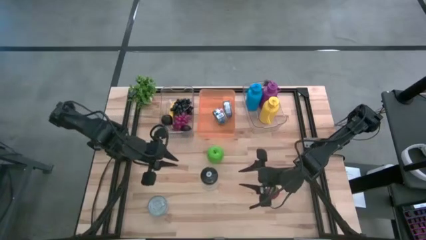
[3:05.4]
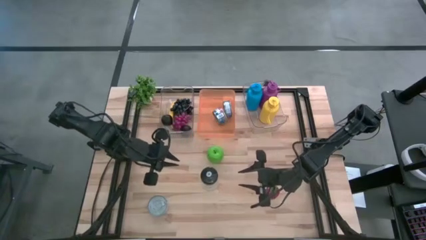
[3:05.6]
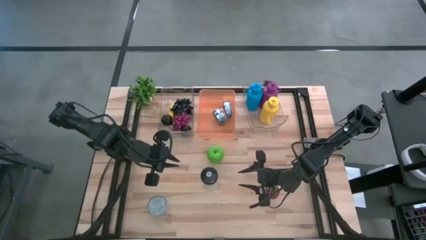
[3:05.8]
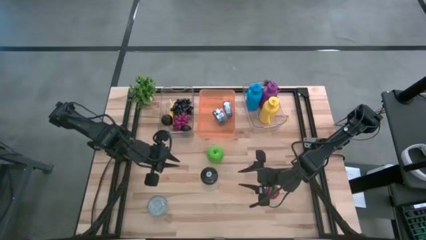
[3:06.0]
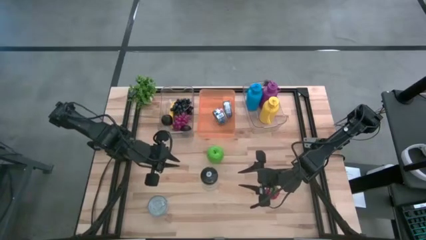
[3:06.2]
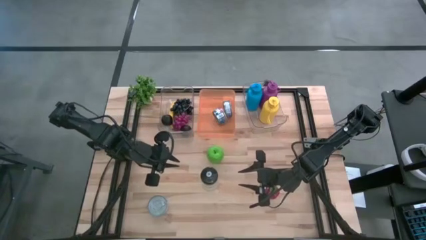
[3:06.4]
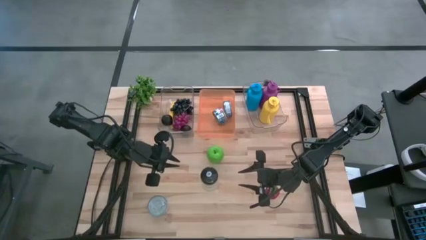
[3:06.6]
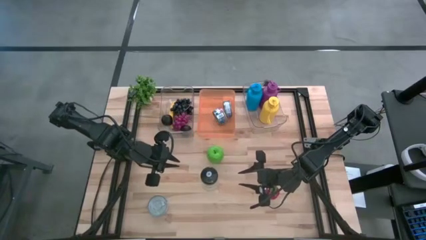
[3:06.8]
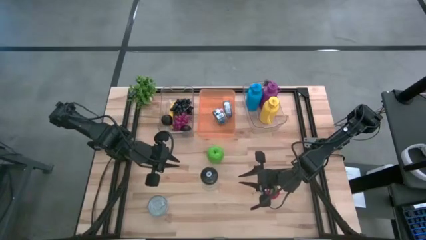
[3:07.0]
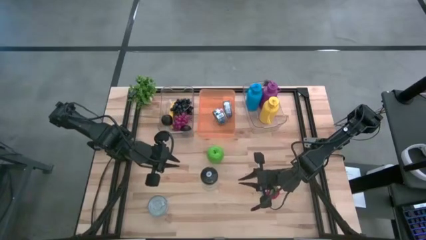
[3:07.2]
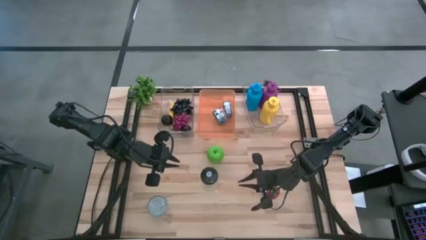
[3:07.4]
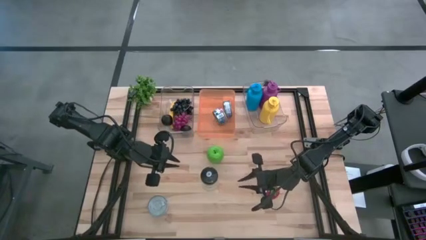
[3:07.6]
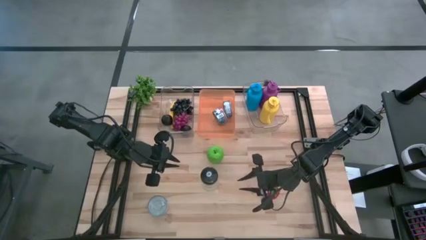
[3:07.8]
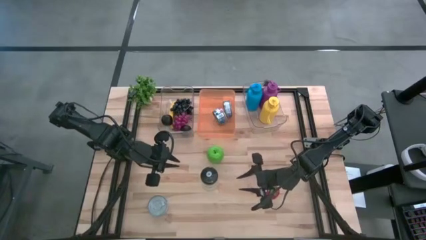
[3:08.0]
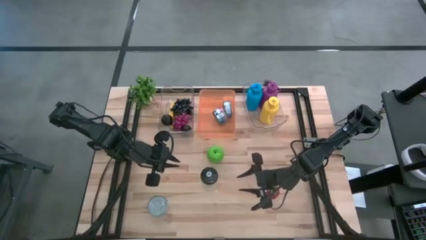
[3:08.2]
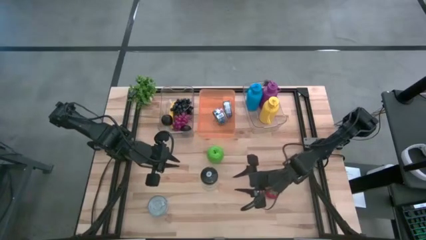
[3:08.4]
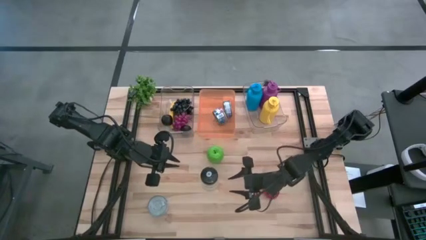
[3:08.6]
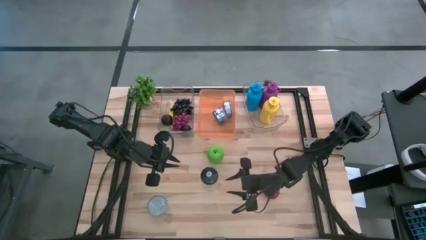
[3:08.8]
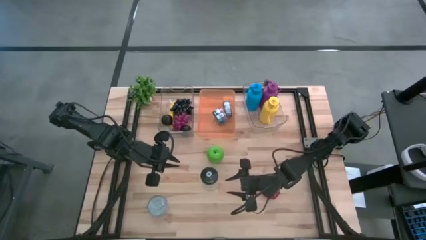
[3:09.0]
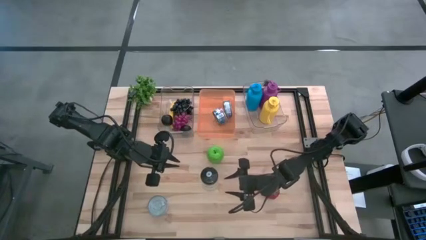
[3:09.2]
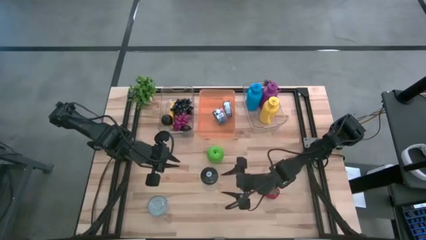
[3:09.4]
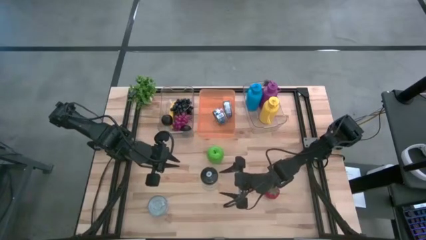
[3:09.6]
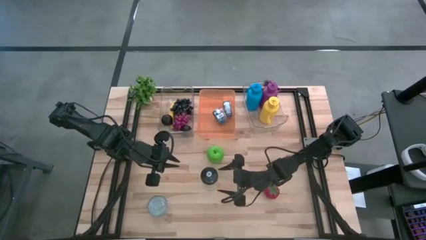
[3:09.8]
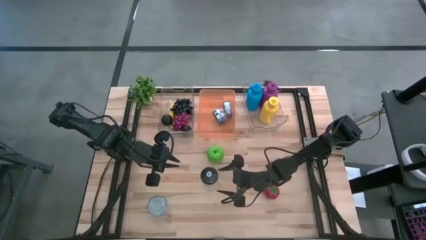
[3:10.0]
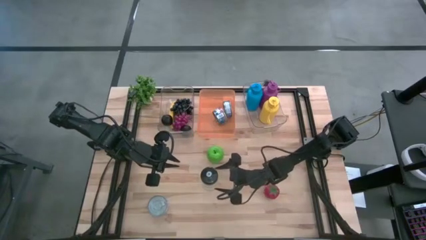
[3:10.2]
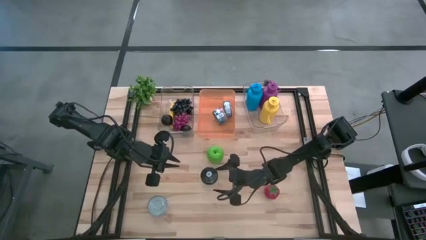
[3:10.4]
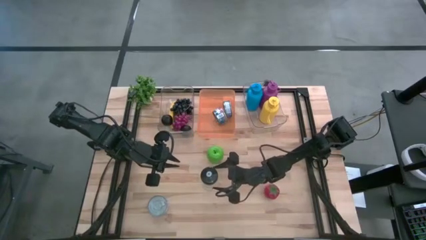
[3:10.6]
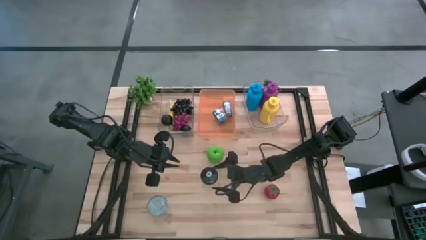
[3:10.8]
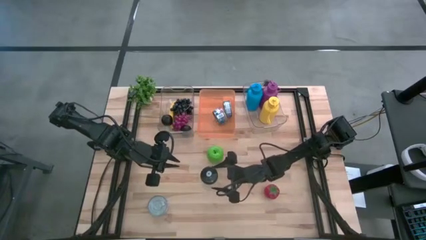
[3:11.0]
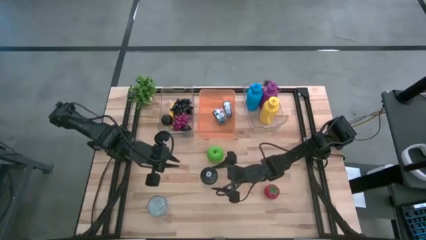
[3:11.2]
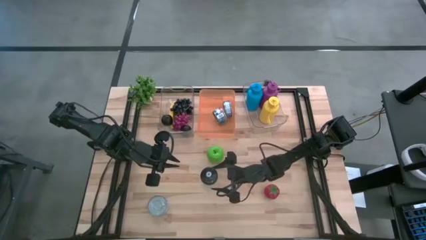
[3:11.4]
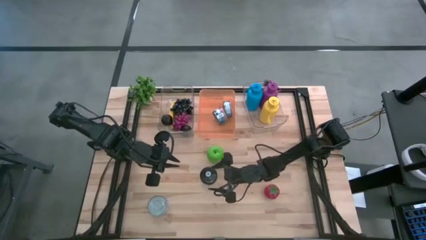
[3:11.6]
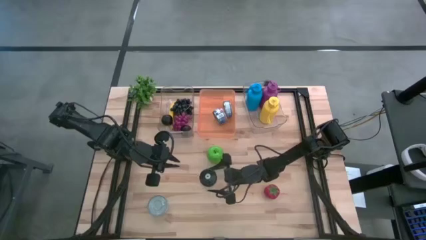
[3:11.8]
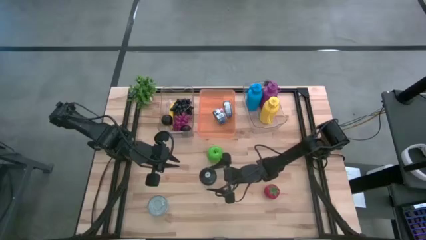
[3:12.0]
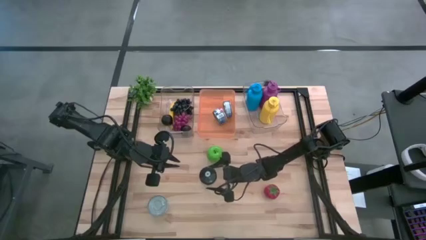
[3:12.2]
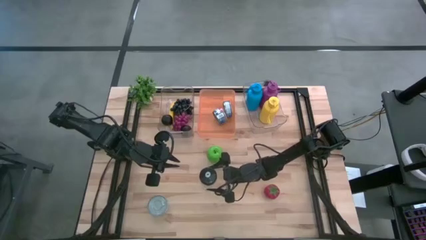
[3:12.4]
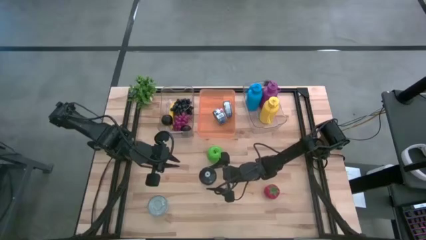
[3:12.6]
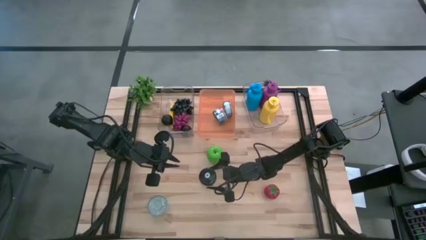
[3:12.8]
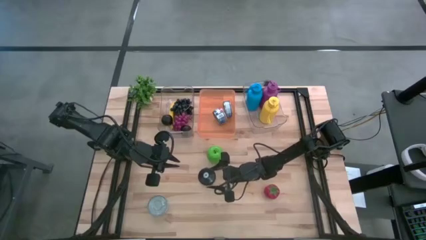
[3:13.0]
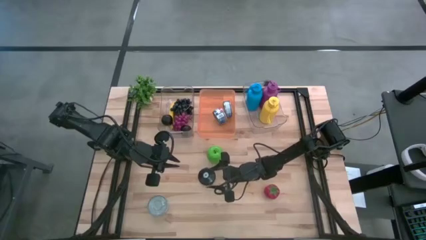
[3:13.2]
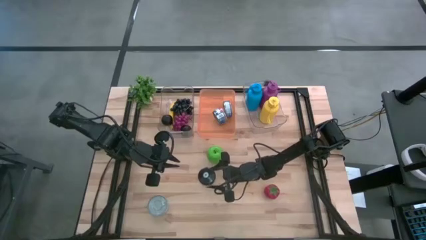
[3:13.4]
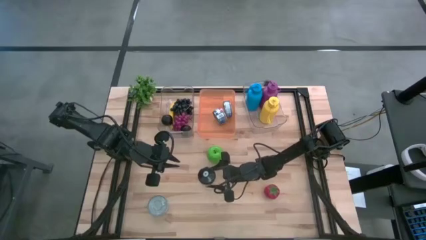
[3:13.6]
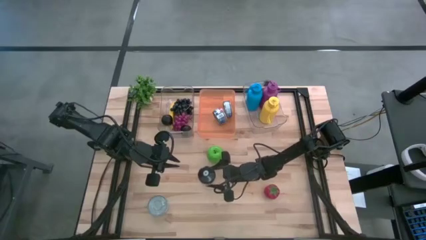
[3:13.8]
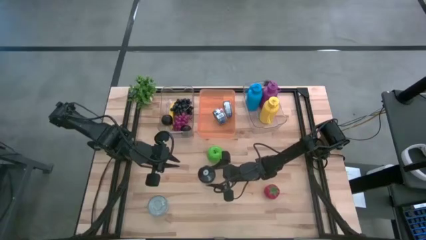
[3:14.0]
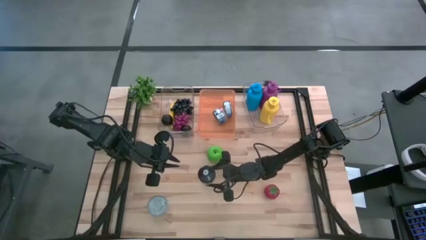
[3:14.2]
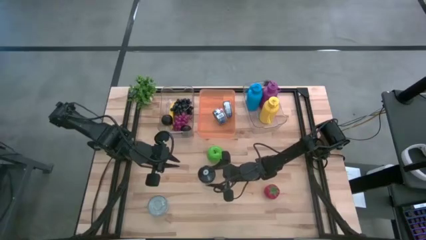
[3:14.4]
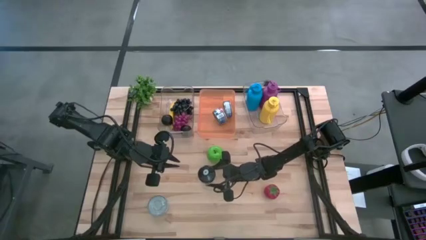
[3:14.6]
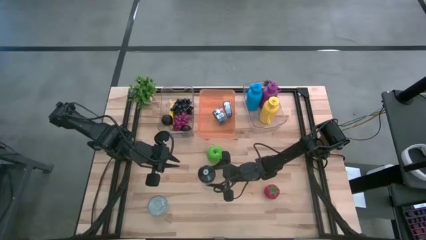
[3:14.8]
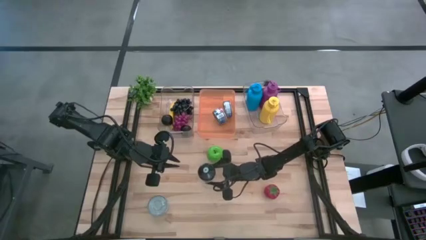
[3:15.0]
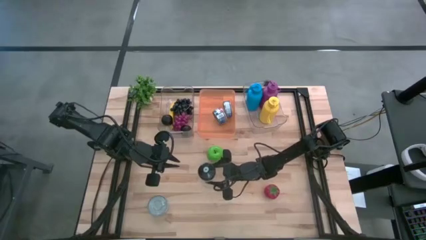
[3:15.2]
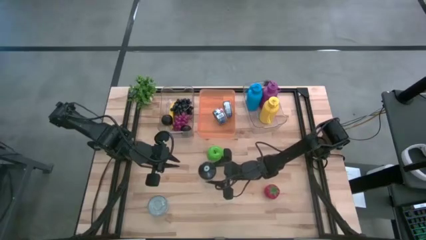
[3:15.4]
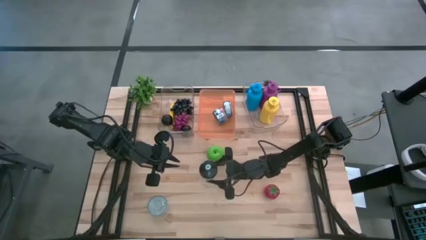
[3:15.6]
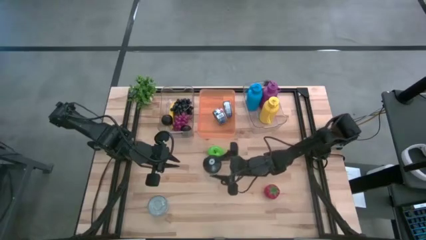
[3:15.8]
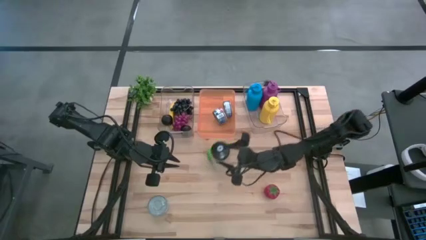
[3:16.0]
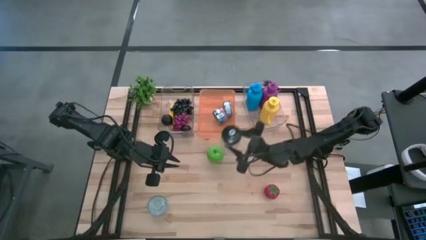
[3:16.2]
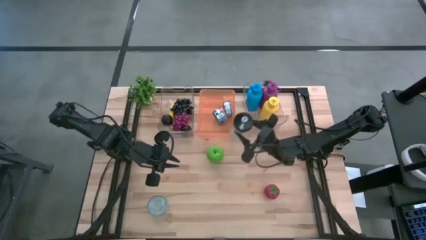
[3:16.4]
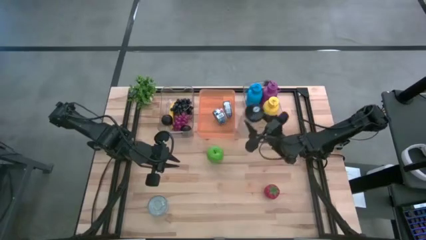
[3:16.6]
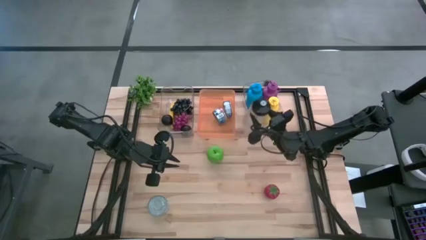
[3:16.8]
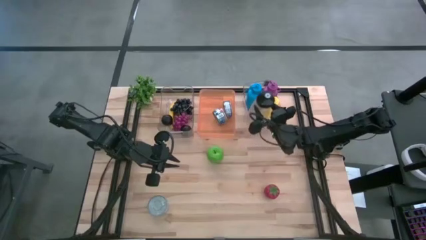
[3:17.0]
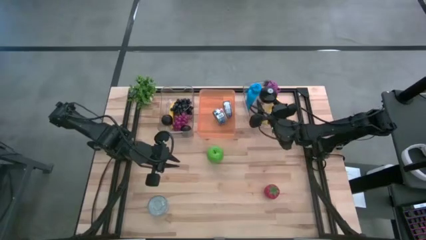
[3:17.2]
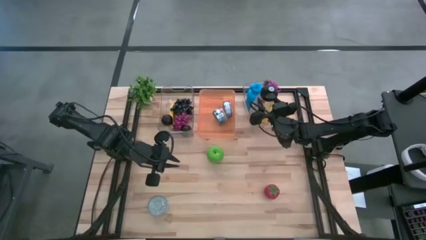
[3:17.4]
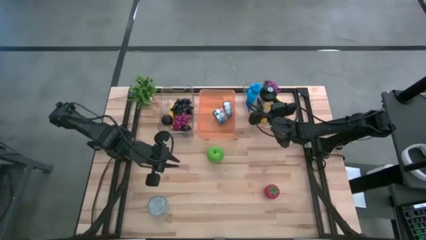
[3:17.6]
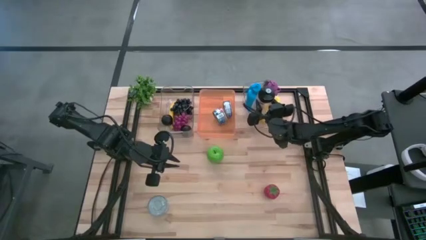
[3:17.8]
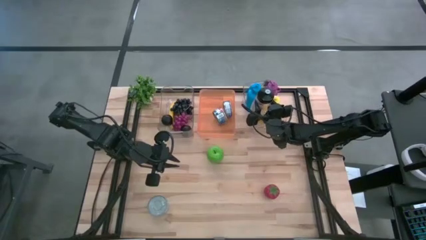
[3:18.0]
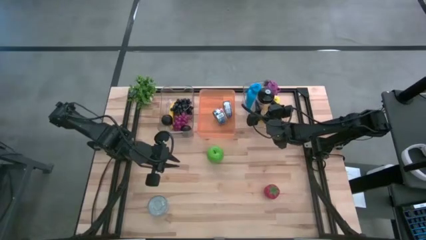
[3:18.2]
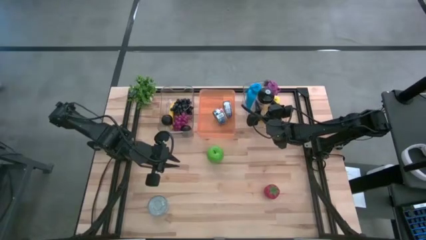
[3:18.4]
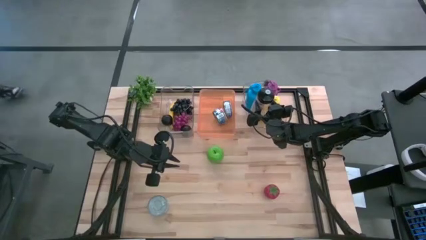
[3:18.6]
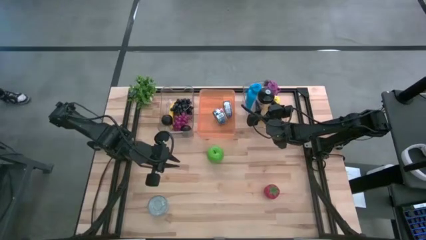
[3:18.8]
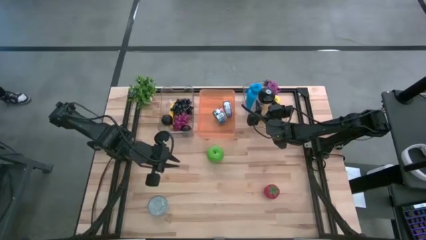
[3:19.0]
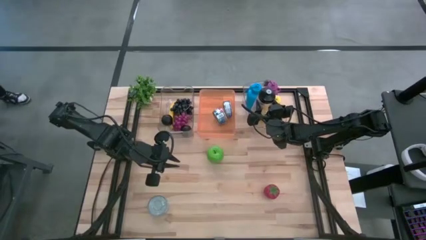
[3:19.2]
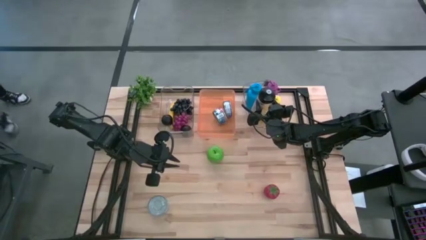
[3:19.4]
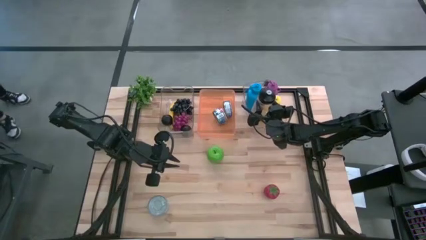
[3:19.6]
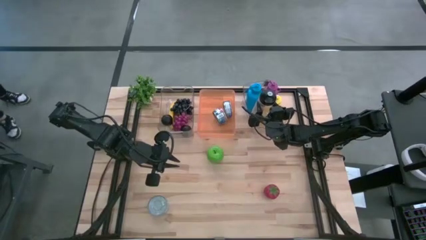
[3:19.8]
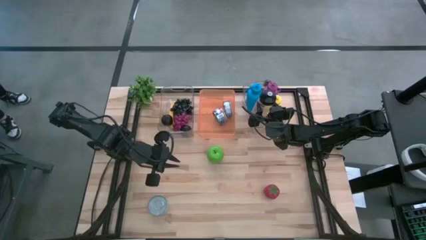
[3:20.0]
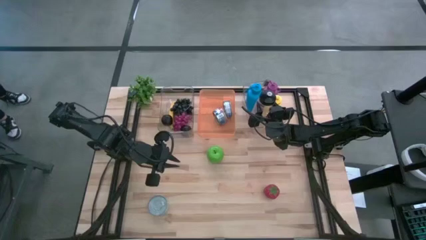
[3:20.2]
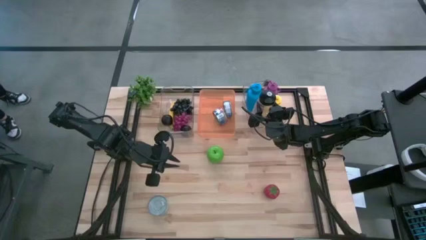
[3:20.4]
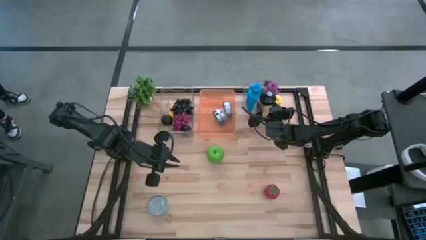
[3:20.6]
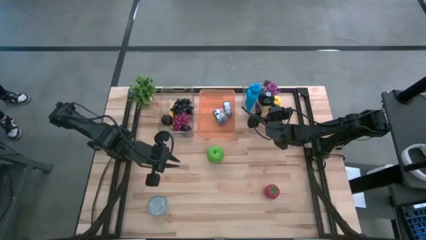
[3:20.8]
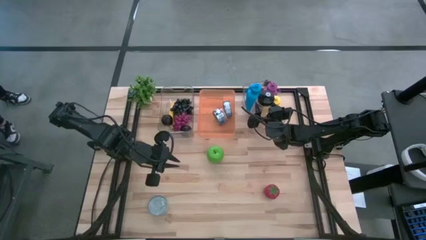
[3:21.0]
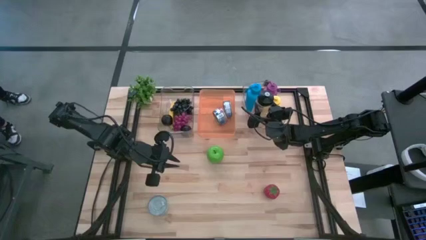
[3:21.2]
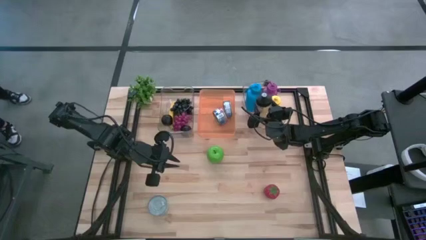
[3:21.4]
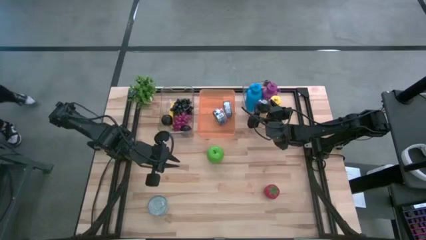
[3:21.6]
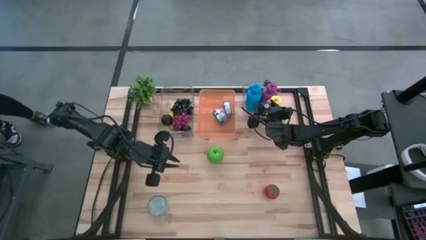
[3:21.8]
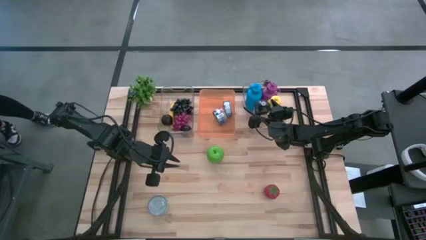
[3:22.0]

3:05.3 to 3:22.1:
Task: Pick & Place Food Item
Put the transparent water bottle into the right transparent bin
